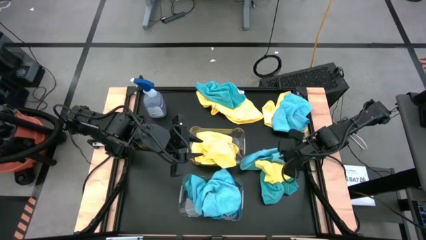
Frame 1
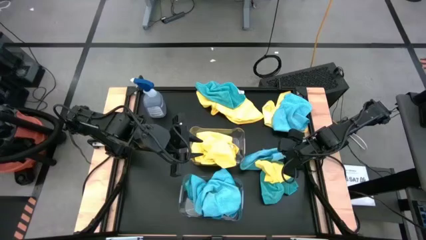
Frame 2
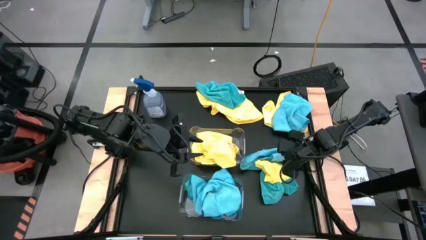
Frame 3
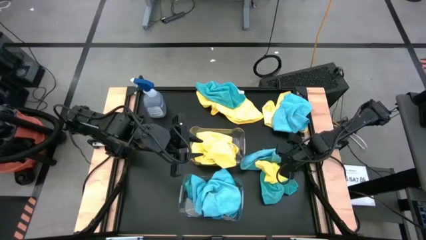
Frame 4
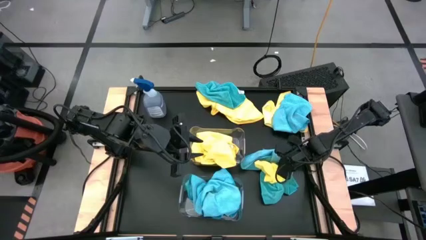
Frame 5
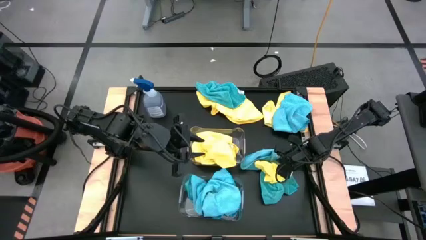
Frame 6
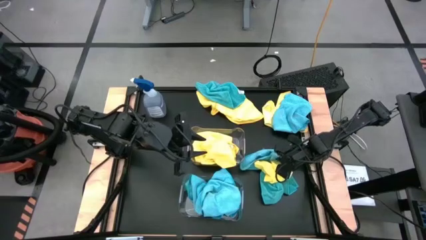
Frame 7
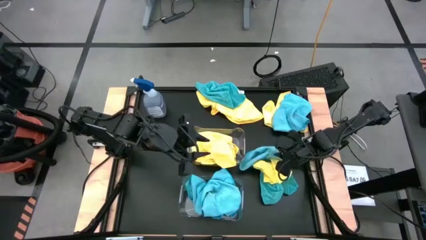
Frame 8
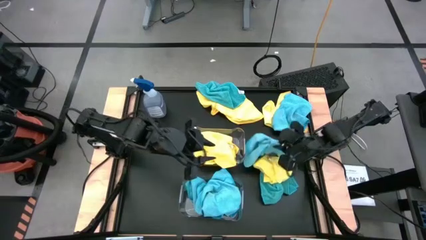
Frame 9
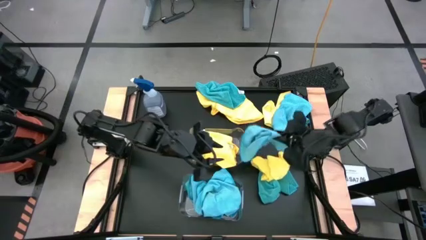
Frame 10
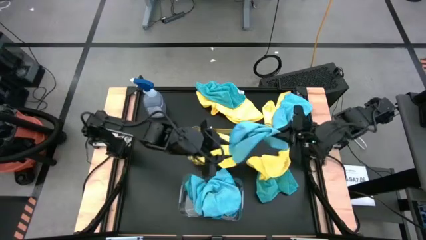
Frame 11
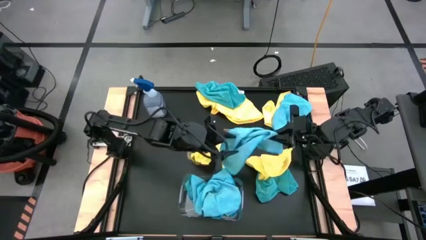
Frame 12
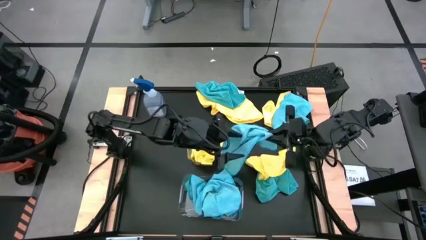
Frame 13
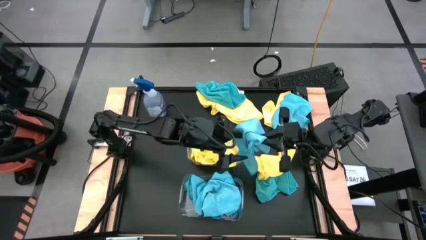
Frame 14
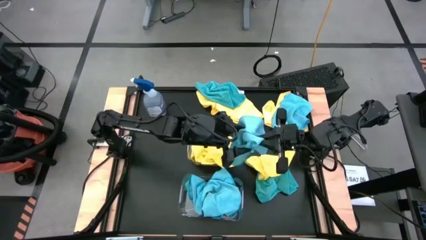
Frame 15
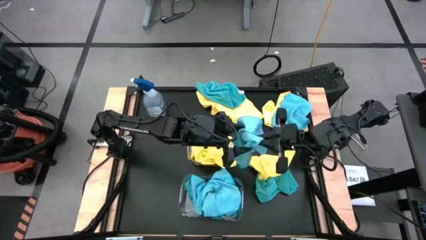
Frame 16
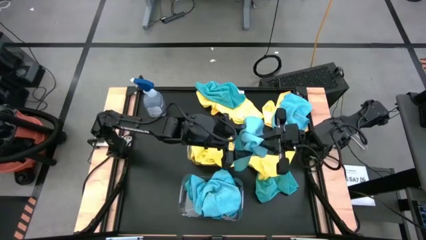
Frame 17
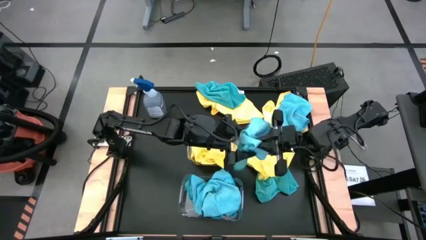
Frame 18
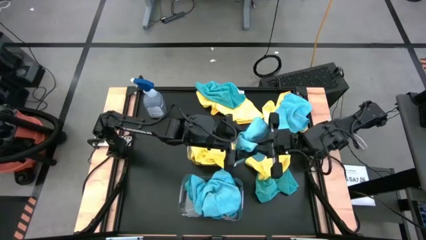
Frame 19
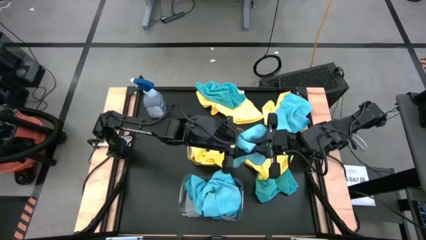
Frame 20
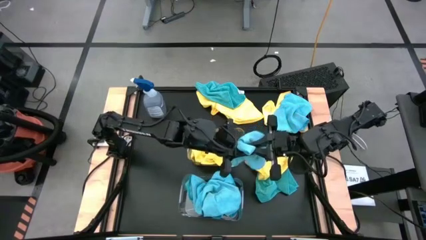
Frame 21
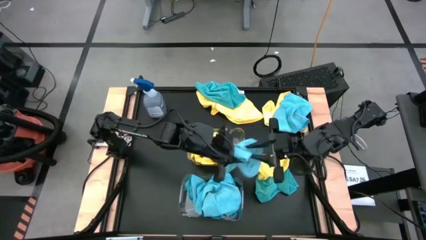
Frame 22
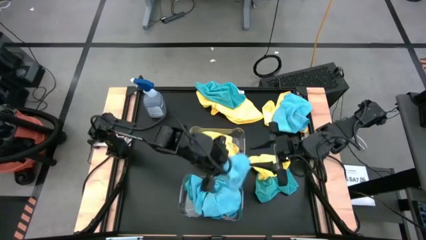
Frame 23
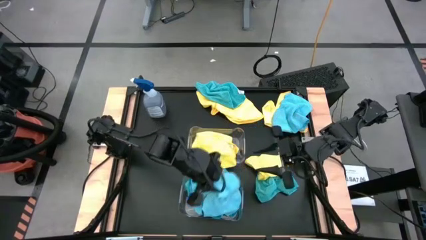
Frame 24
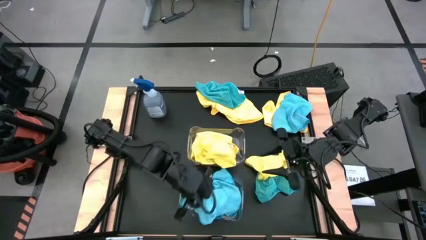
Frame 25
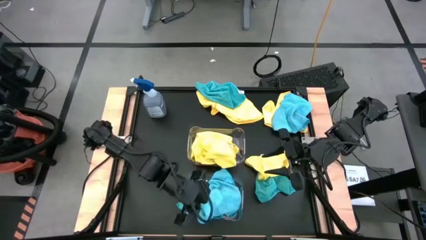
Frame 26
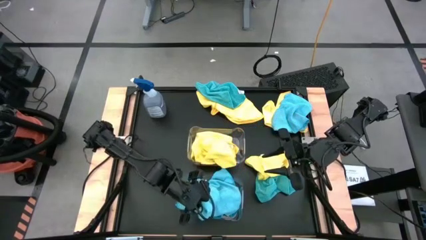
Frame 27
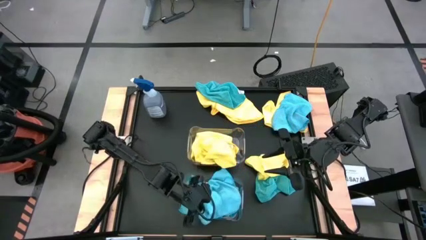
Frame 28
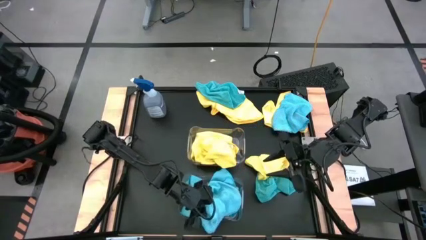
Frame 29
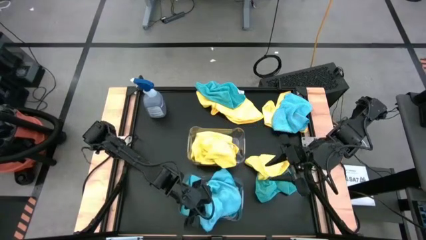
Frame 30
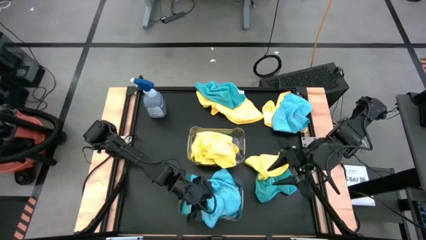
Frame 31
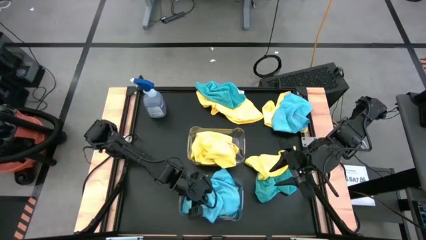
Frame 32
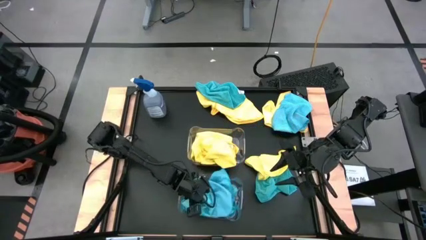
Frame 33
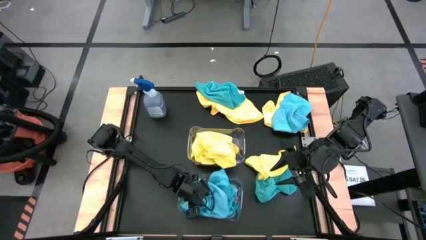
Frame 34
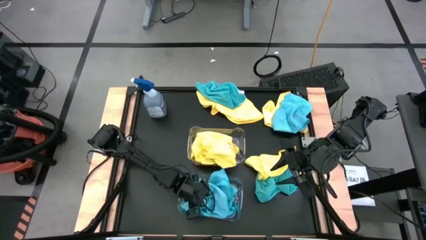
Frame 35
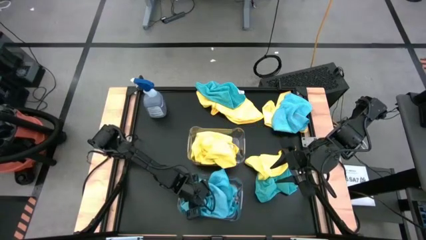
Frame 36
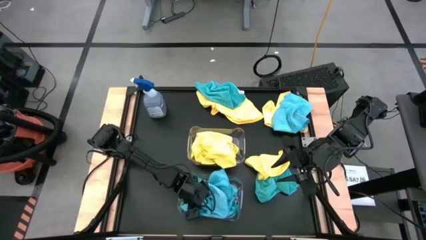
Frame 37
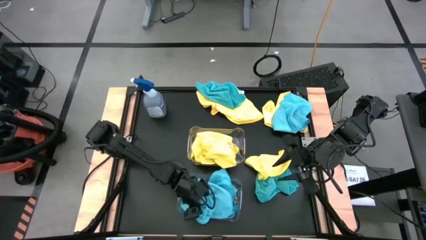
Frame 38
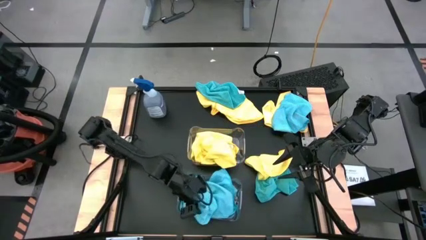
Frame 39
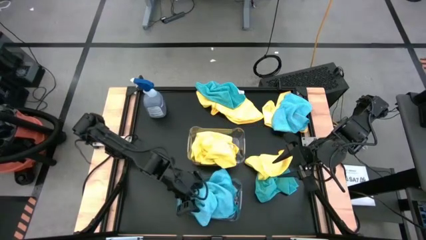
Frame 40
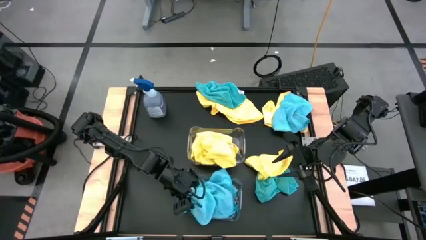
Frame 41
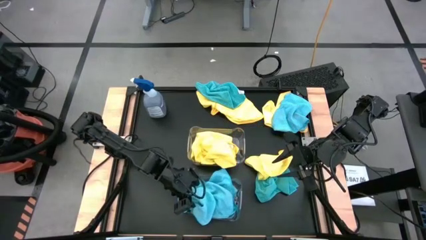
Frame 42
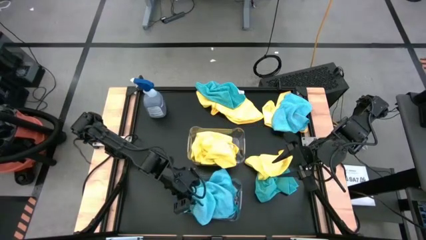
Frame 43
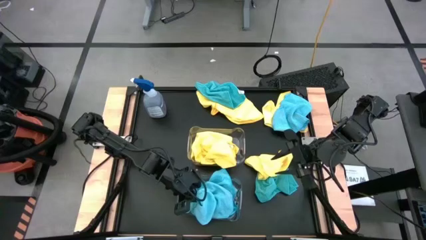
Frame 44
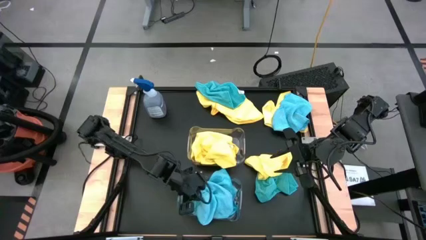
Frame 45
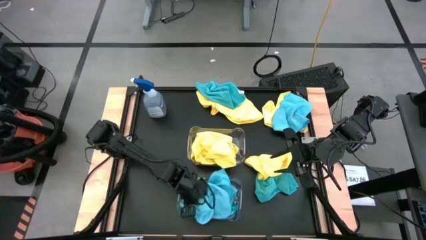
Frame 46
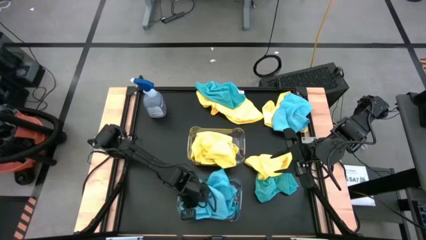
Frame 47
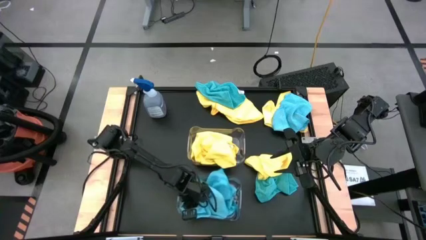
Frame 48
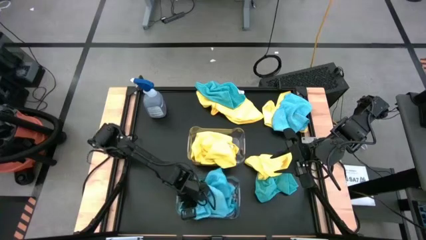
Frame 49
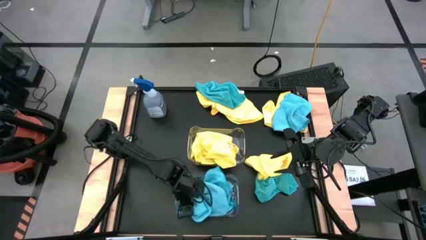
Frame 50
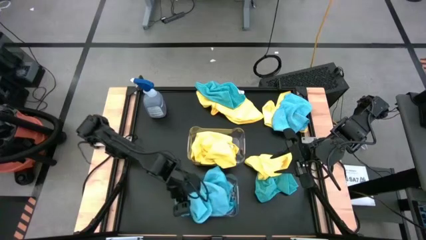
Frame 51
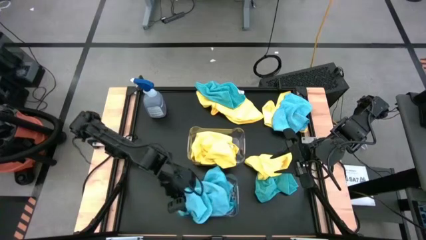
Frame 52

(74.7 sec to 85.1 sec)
Task: Sort microfiber towel by color & place in baskets
Put the blue microfiber cloth into the bottom transparent bin

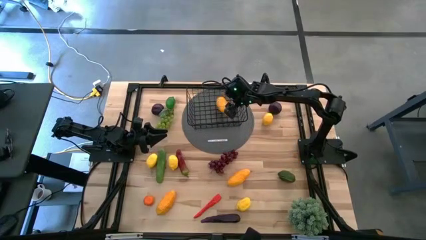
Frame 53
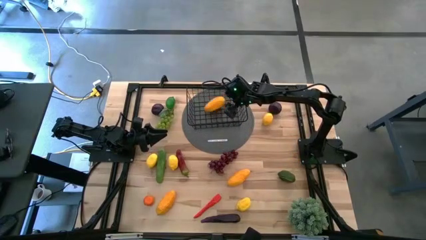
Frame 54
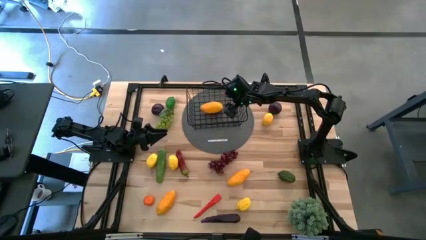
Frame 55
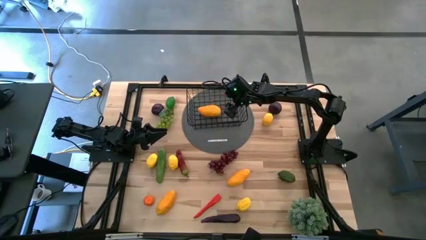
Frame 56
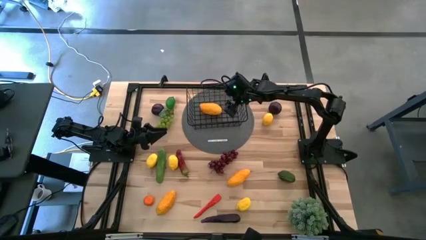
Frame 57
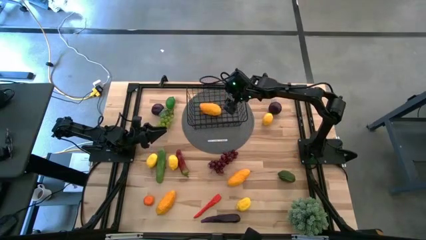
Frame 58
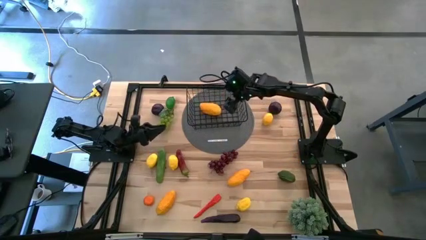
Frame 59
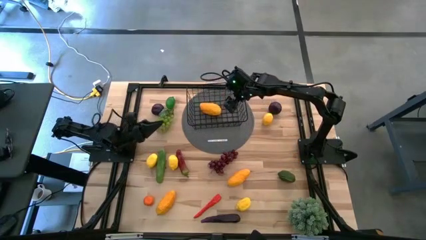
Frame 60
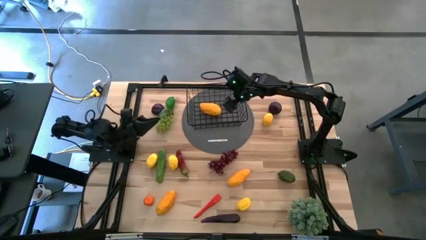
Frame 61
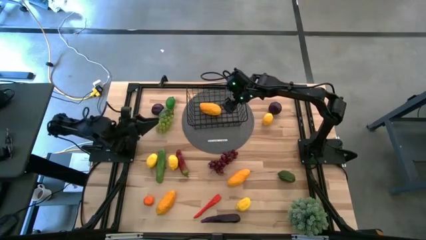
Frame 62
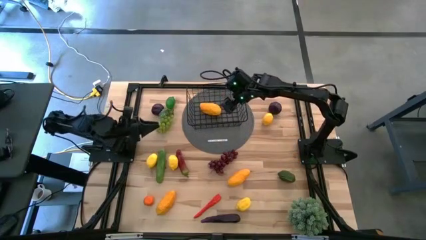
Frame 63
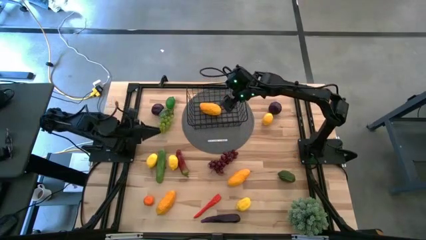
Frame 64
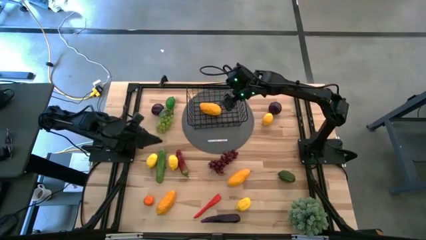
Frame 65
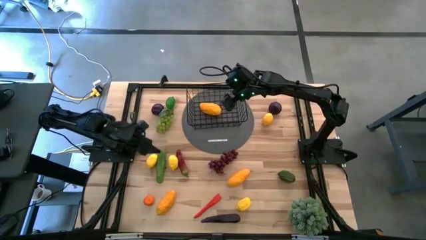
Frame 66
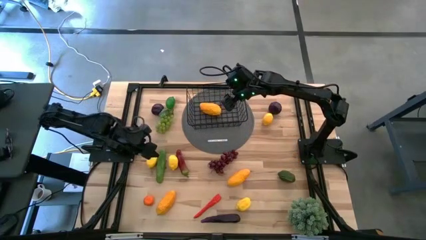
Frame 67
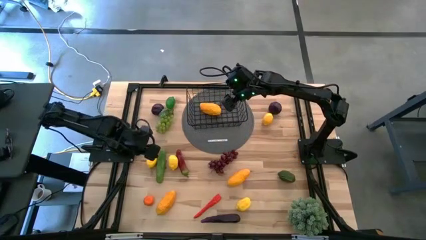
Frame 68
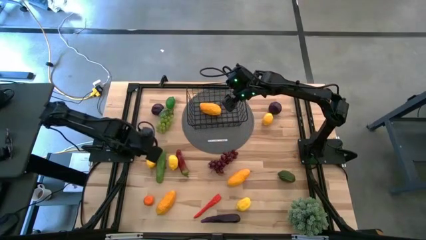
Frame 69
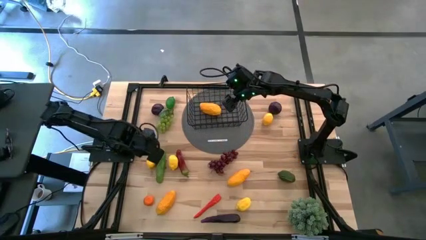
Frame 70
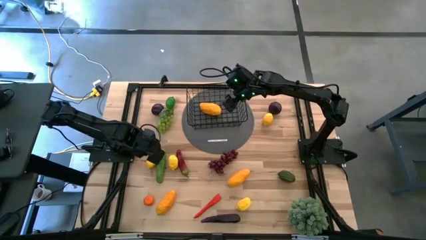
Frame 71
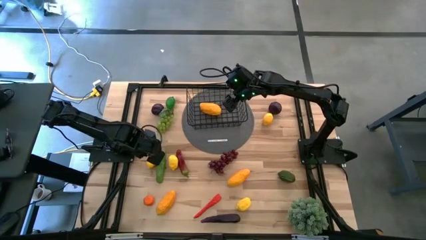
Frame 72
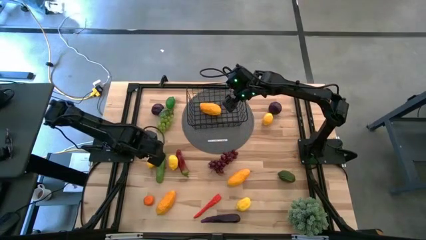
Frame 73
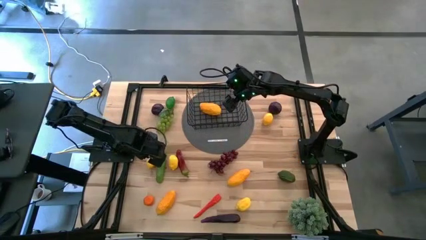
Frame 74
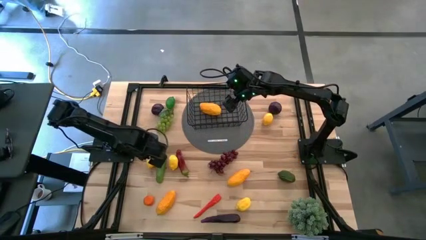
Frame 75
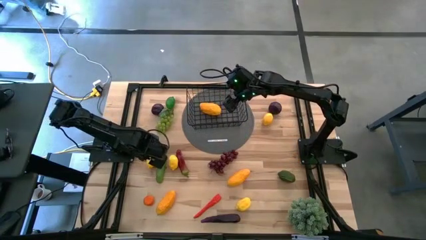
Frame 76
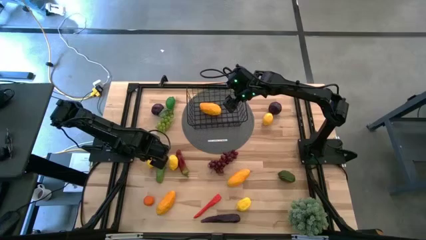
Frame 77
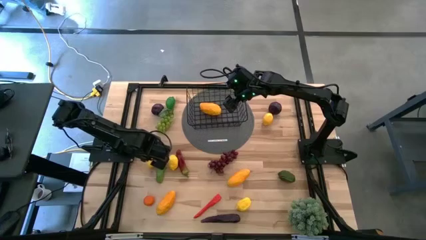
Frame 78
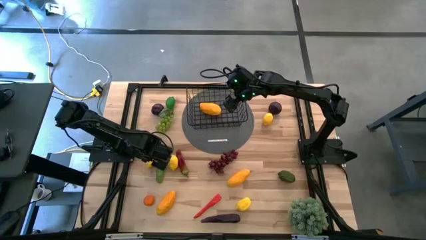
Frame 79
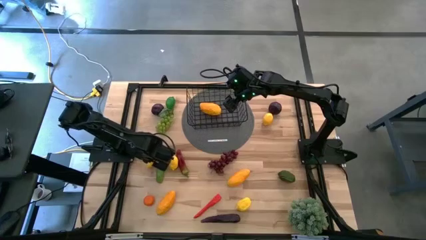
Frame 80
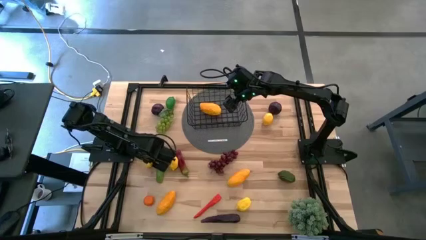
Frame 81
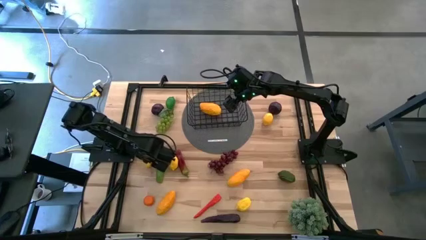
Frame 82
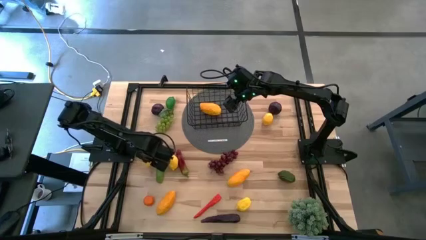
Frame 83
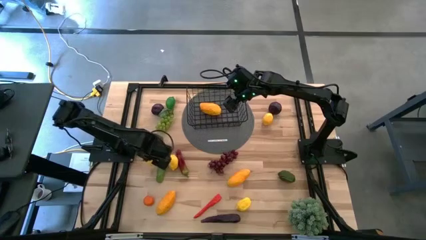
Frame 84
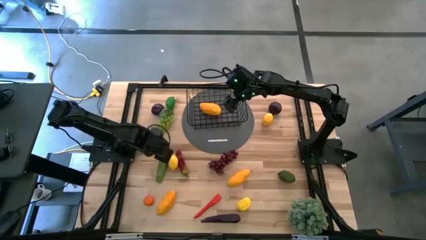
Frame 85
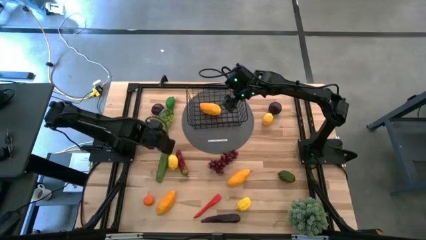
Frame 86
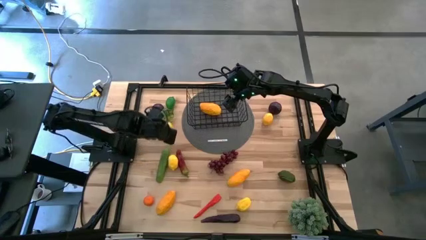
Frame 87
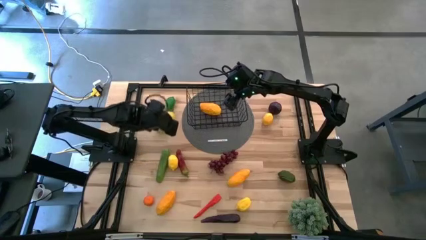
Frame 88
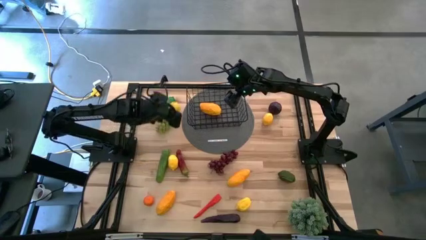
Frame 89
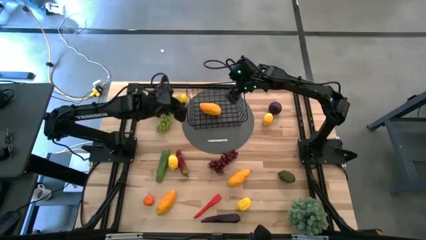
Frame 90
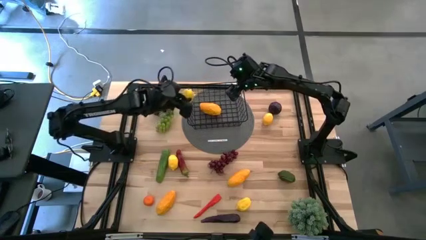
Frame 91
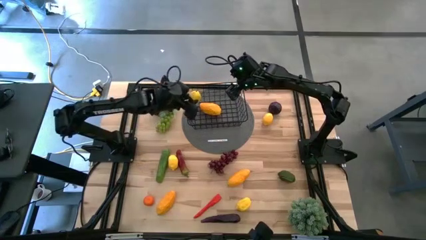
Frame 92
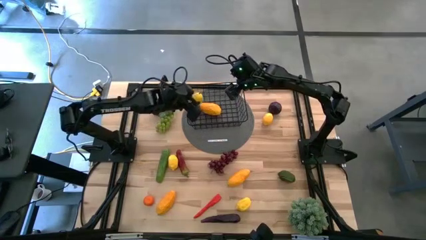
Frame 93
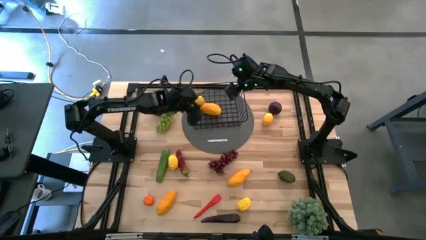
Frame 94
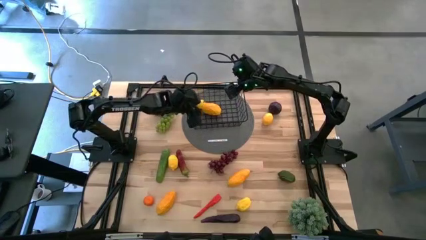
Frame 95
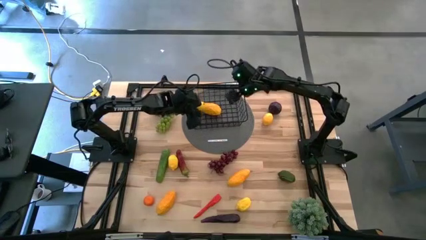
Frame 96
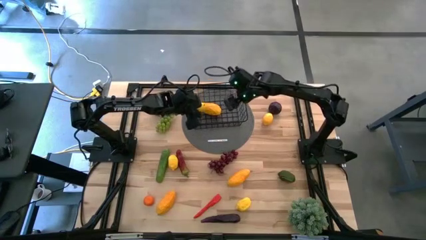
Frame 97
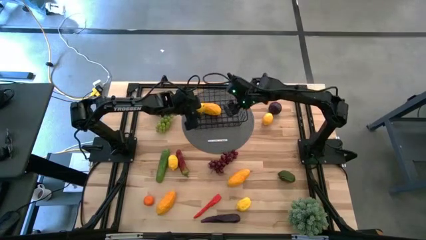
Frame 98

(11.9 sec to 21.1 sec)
Task: Build produce basket
Put the middle left lemon into the wire basket
